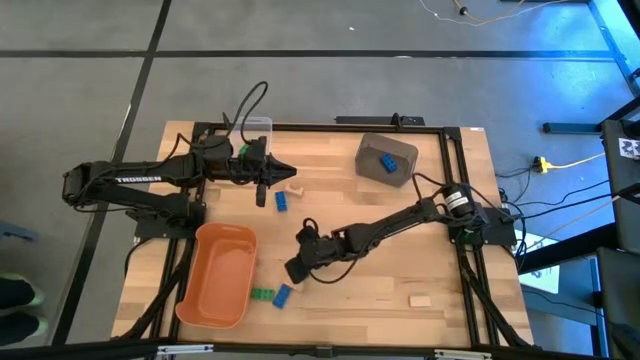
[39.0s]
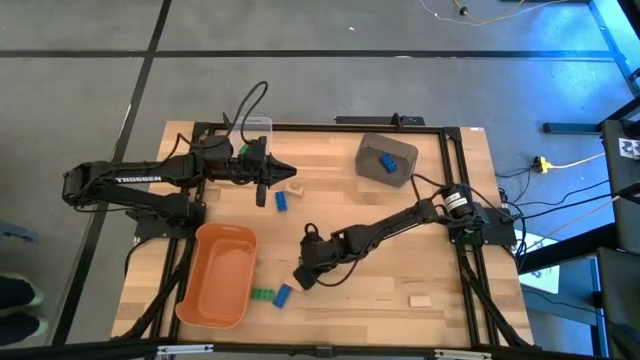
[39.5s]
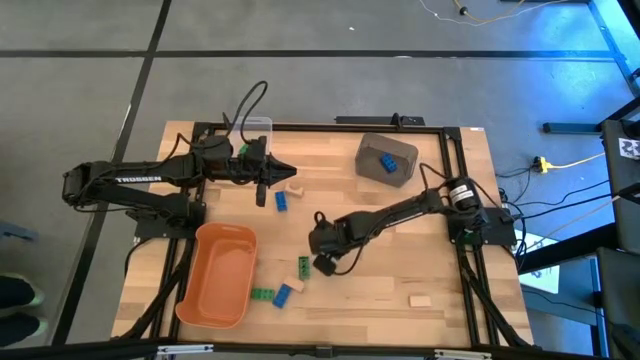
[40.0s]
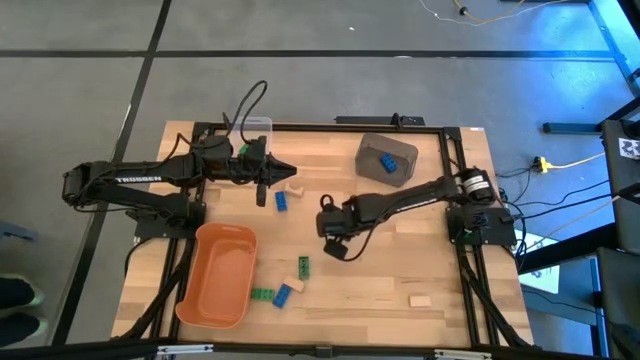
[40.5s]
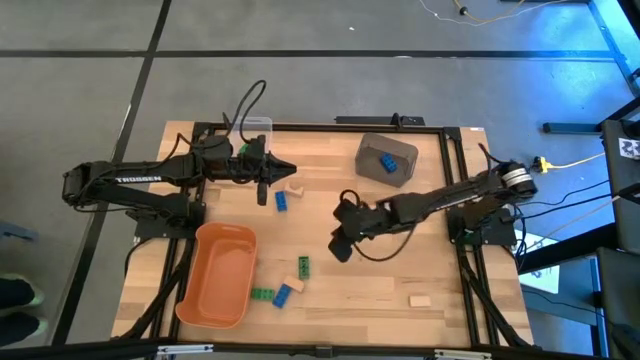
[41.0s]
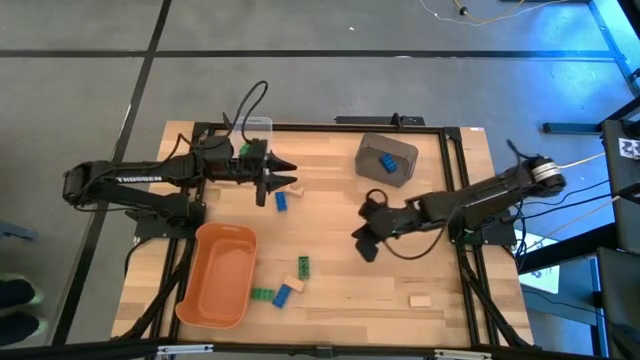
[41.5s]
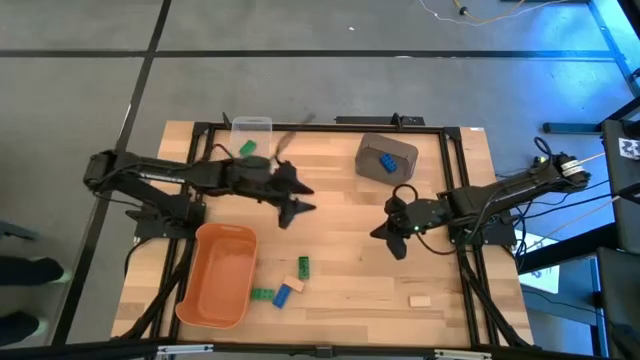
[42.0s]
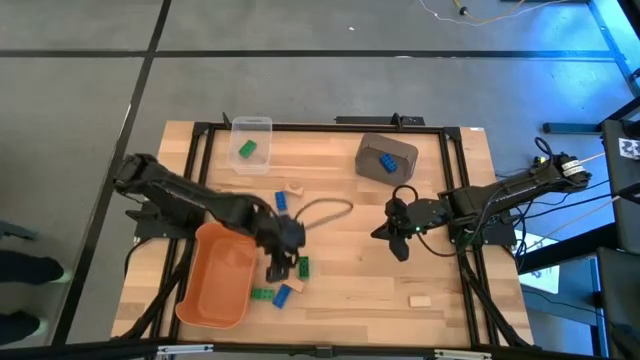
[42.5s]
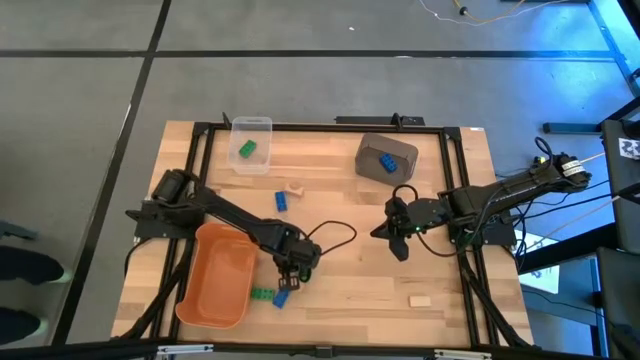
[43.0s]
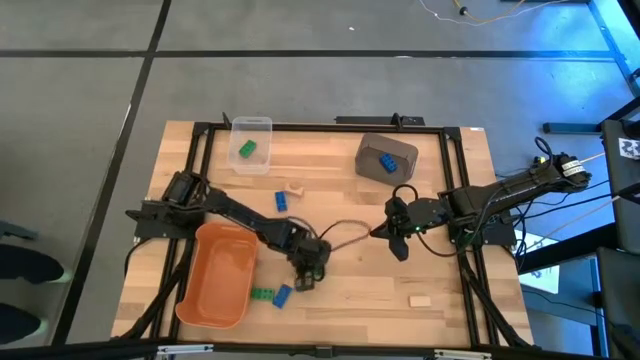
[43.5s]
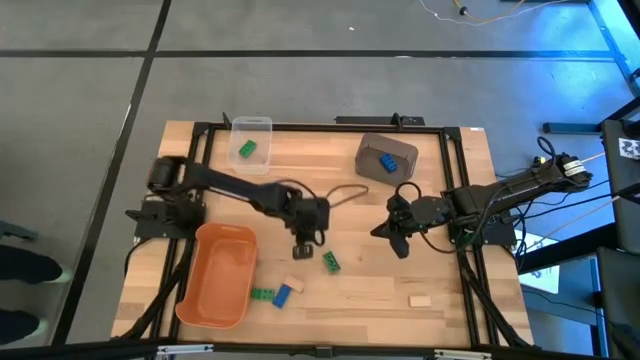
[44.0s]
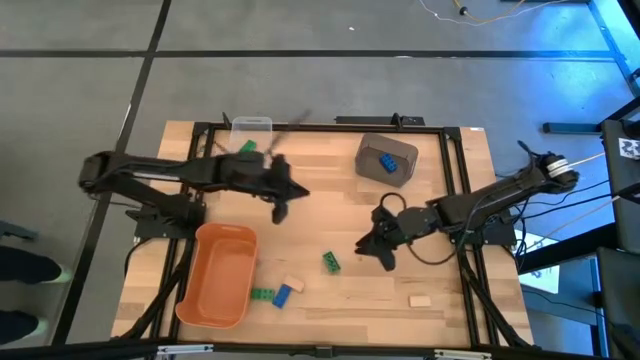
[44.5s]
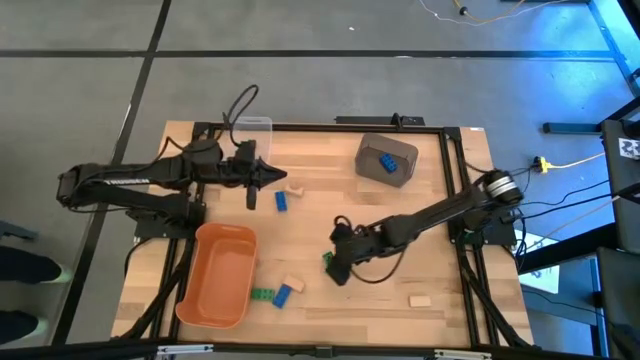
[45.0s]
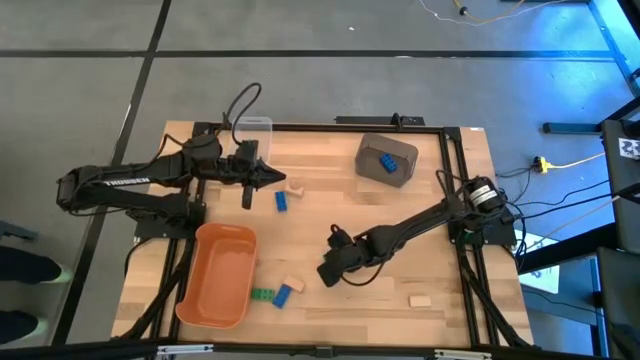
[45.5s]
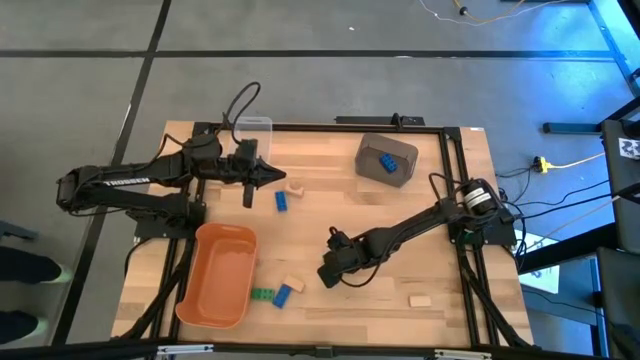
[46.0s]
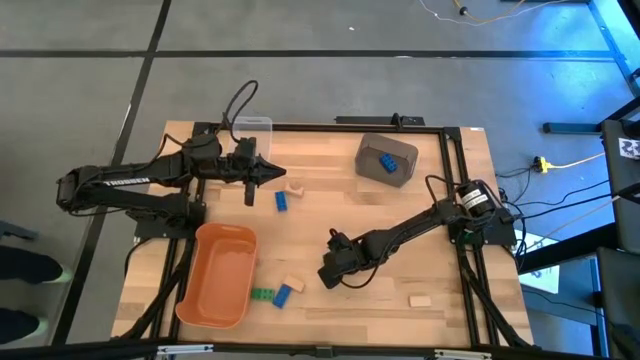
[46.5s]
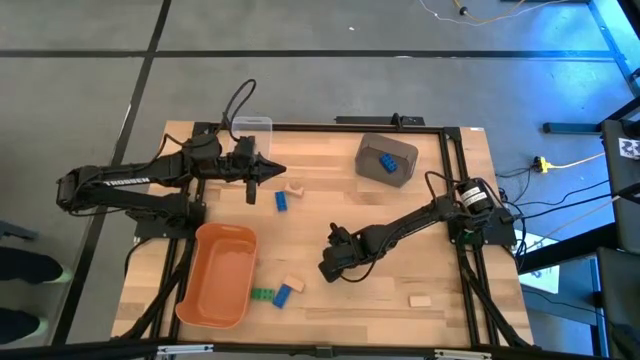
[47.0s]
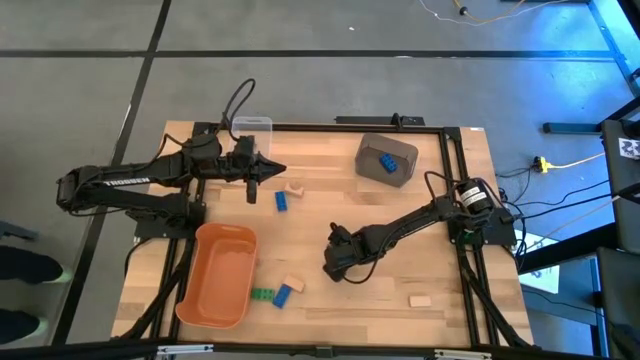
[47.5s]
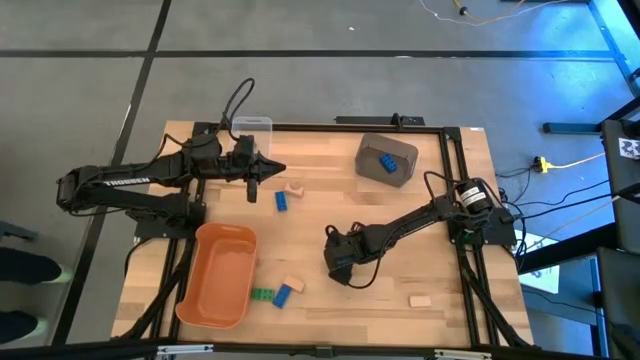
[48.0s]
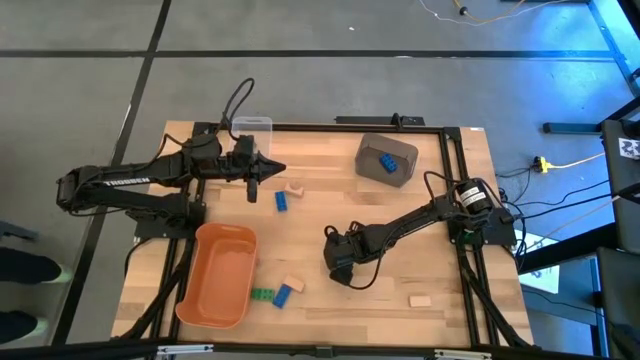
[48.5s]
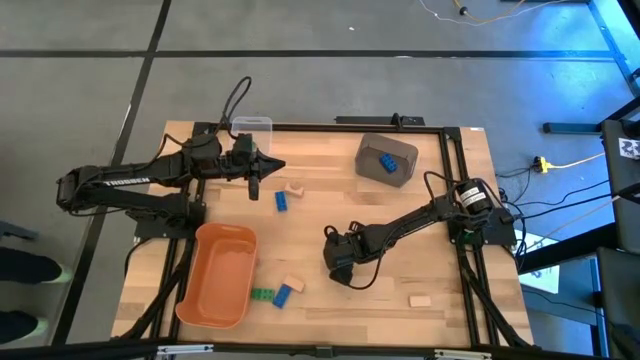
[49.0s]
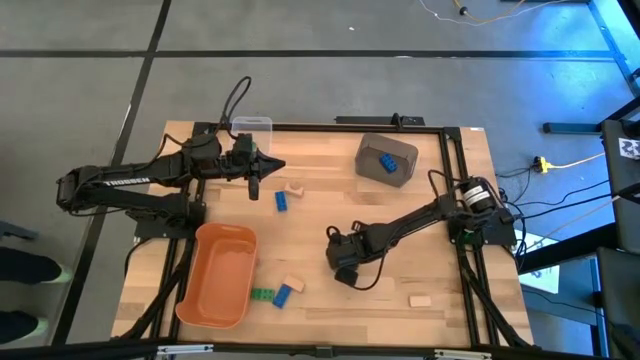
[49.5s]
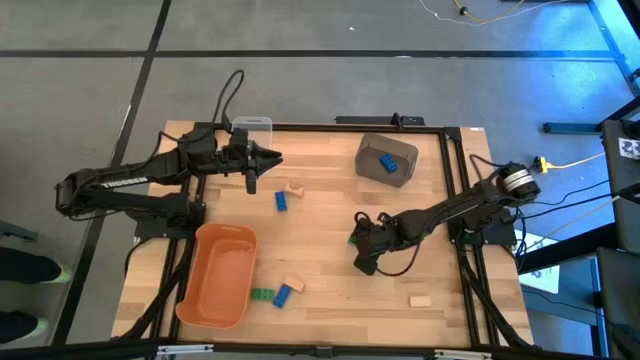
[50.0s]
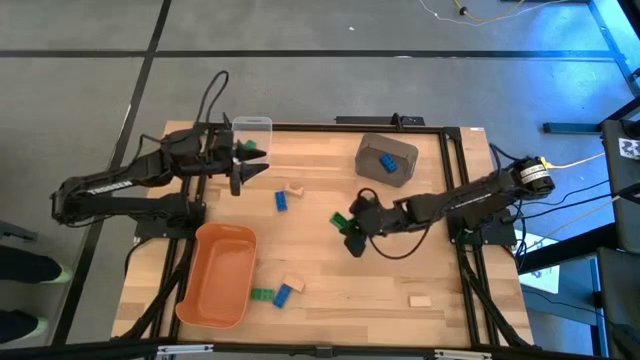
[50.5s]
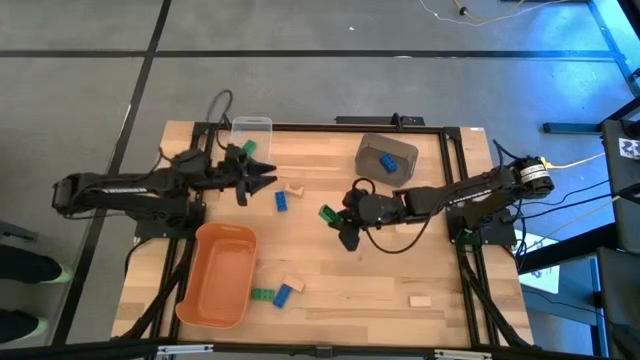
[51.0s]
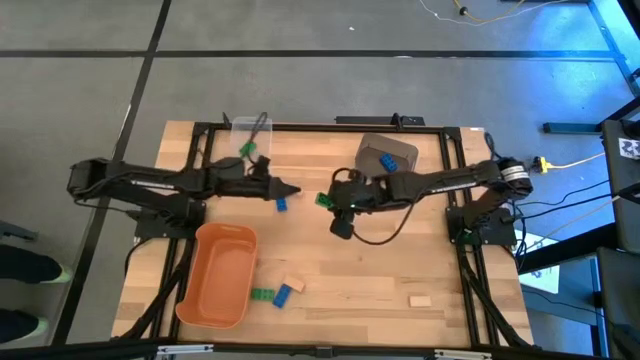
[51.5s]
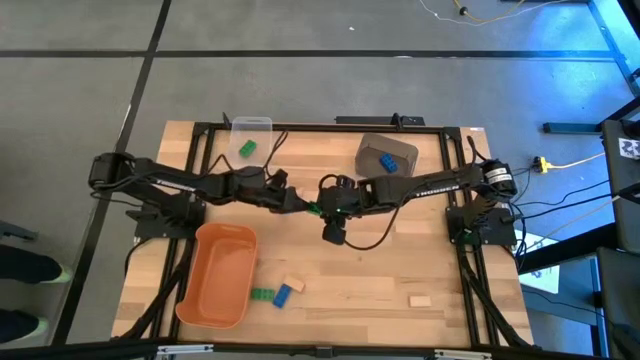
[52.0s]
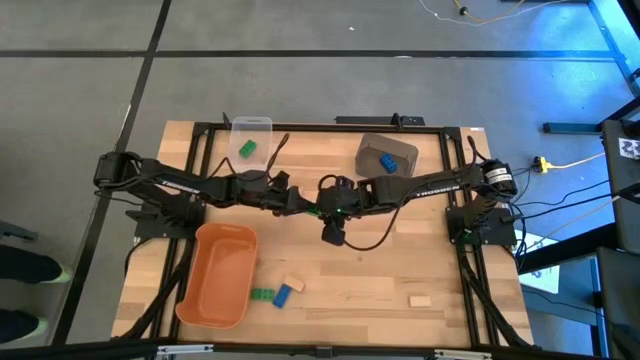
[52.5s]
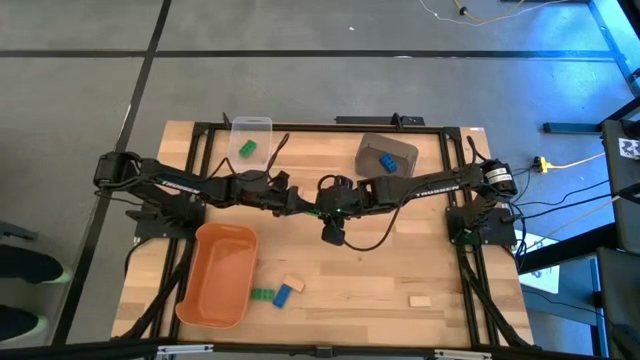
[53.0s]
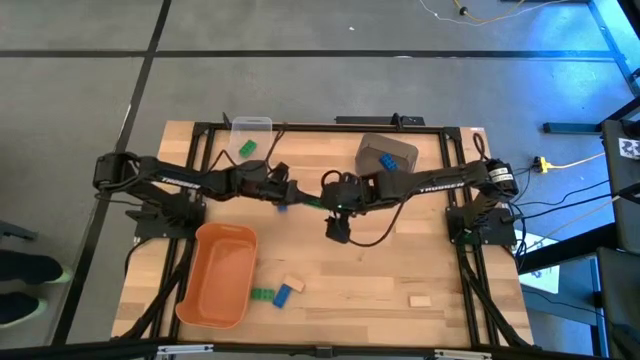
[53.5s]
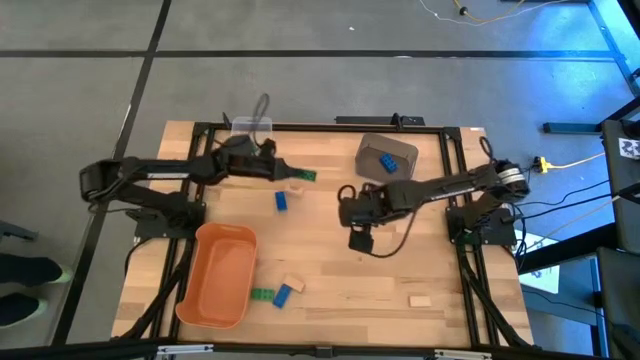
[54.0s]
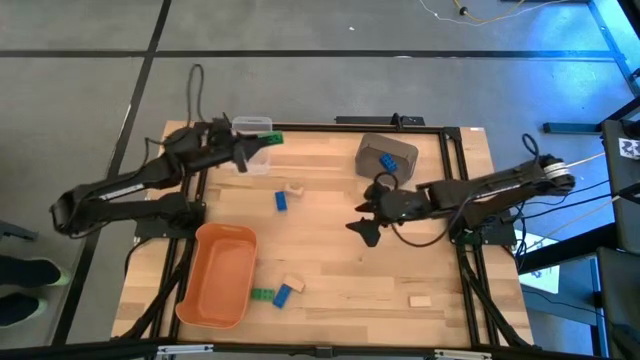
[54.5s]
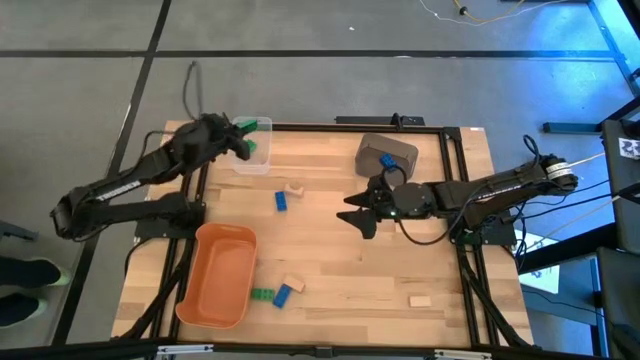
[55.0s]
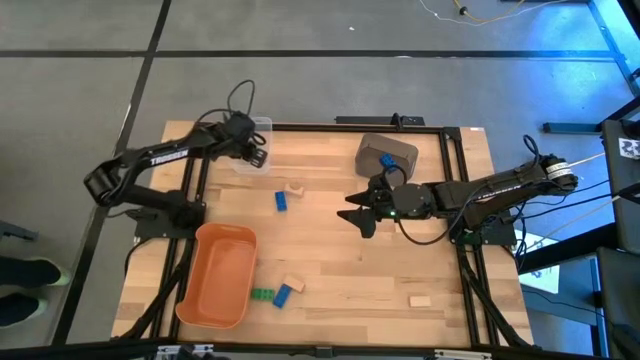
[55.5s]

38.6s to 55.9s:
Task: Sort & place blocks by color
Put the right green game piece into the transparent bin

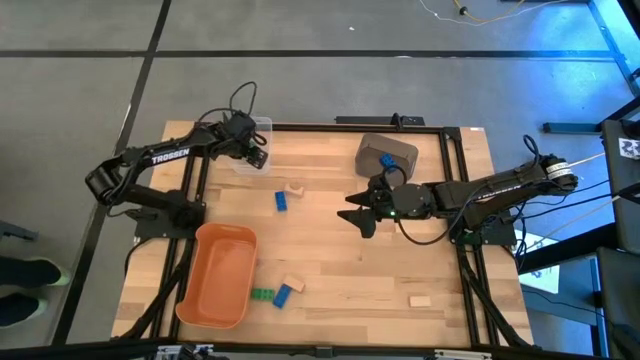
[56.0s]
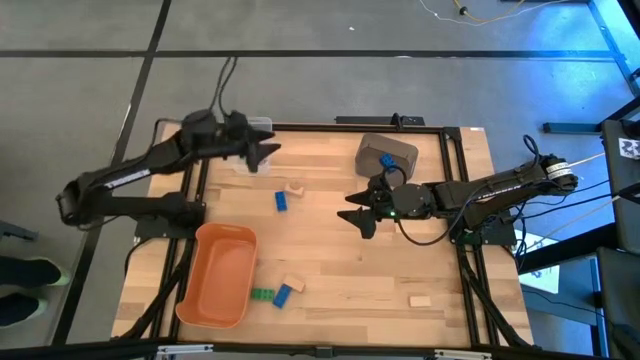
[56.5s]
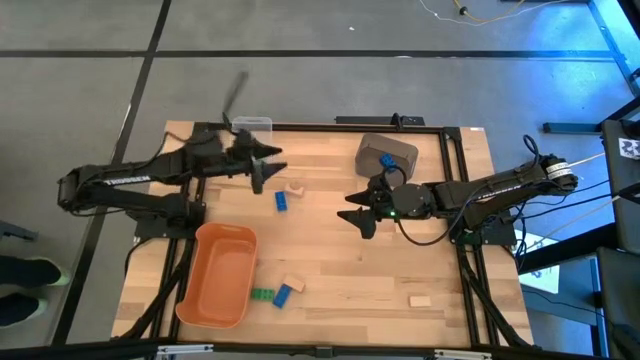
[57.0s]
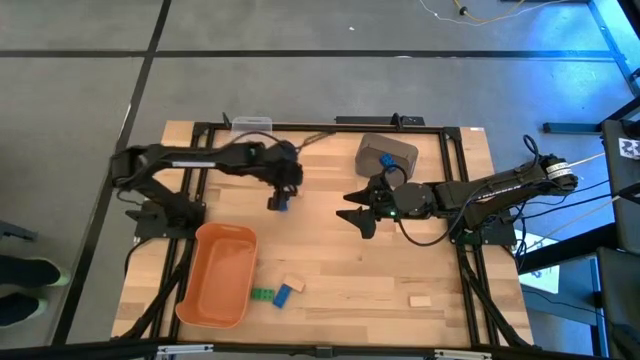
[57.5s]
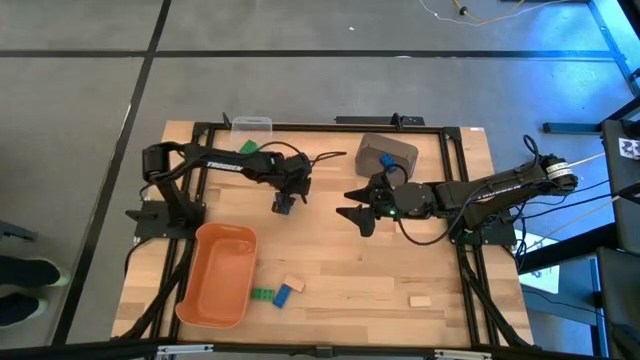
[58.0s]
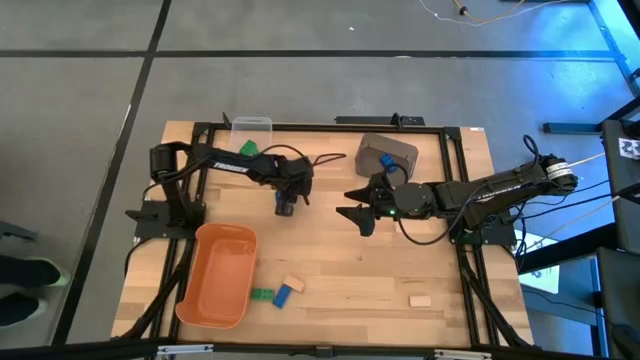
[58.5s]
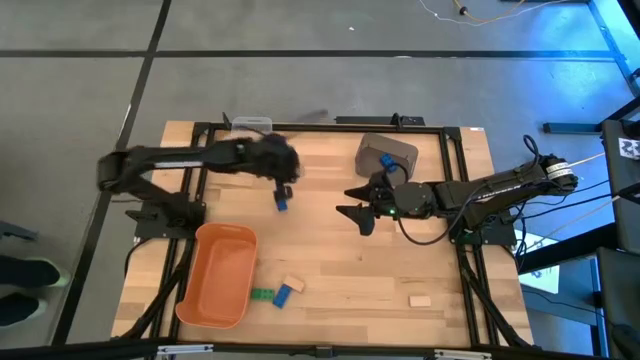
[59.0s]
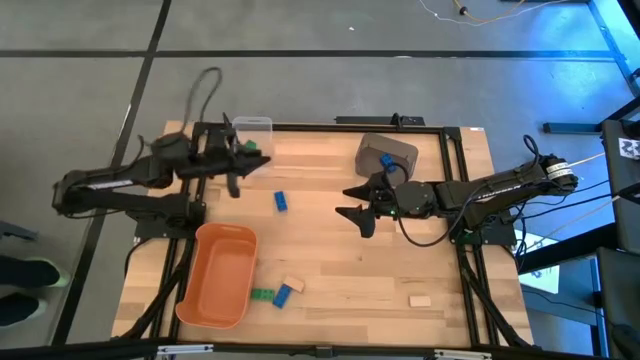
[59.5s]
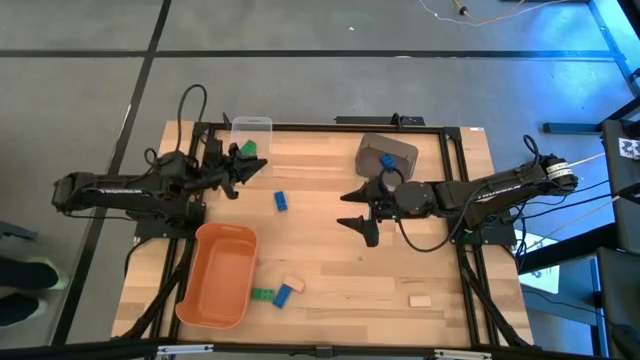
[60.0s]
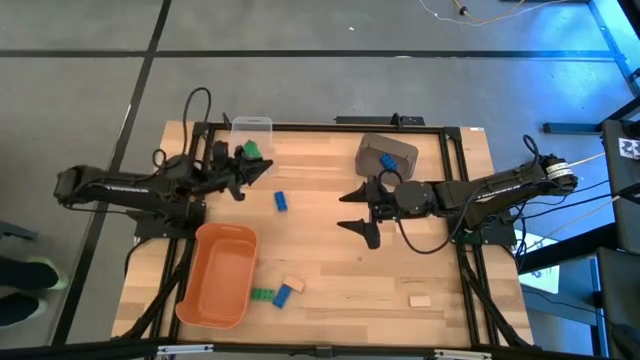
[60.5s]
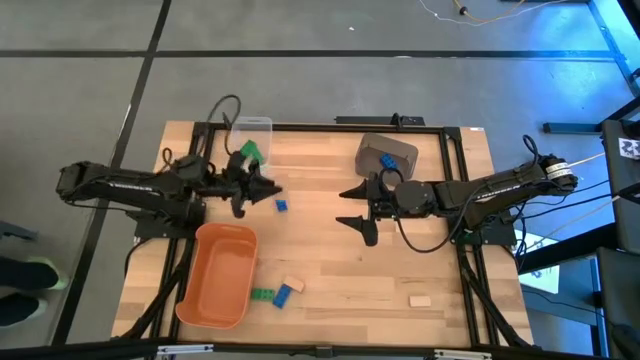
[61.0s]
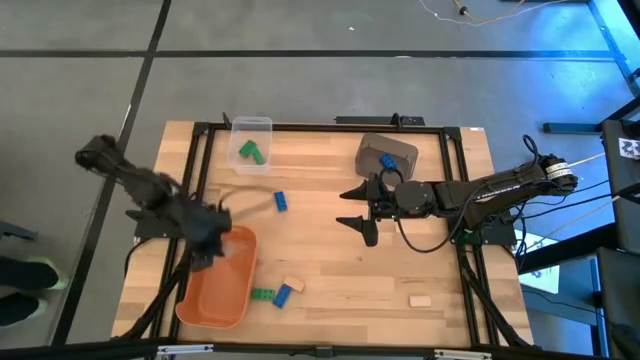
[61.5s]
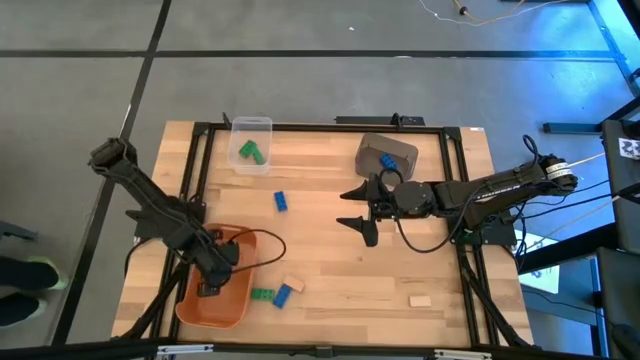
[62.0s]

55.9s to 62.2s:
Put the top brown block into the orange bin
